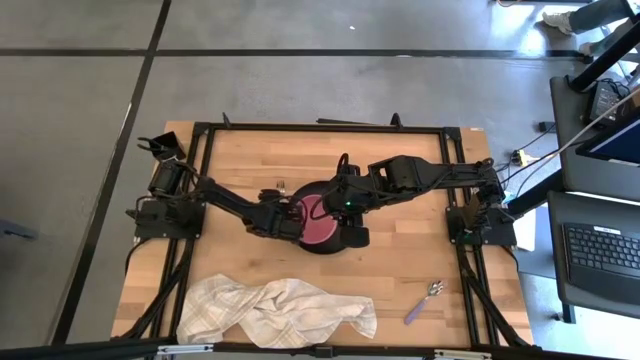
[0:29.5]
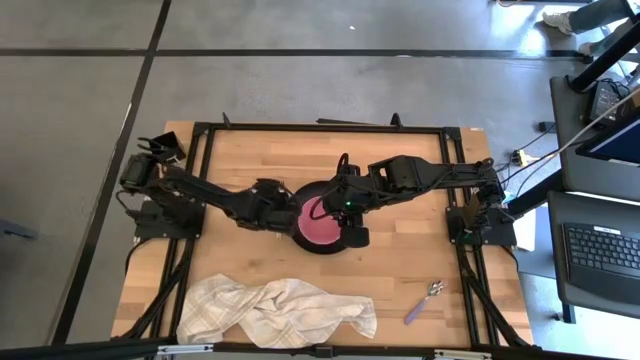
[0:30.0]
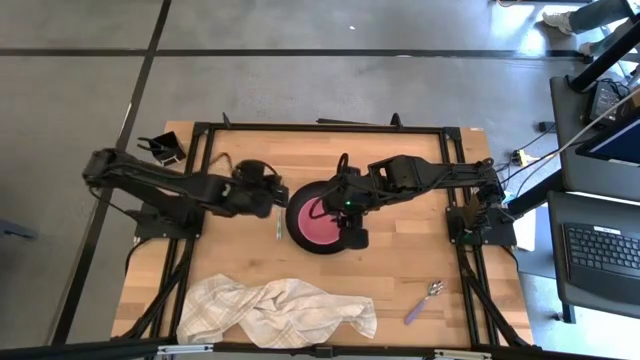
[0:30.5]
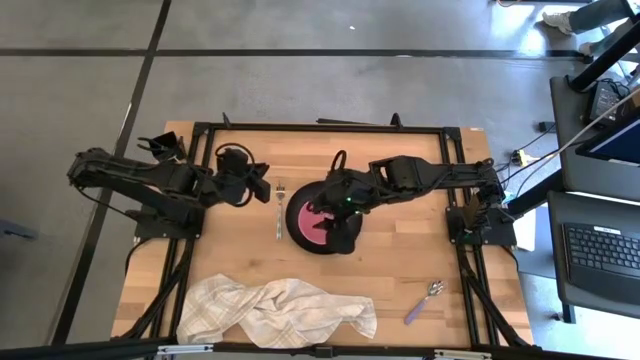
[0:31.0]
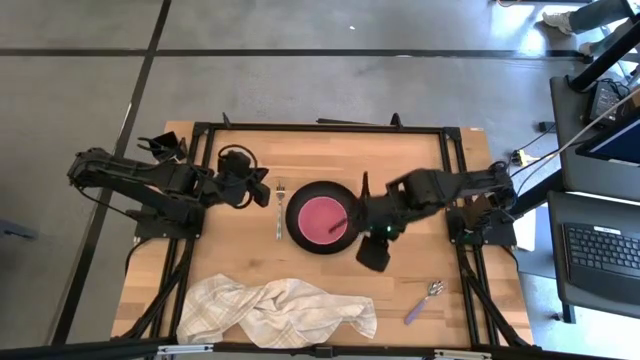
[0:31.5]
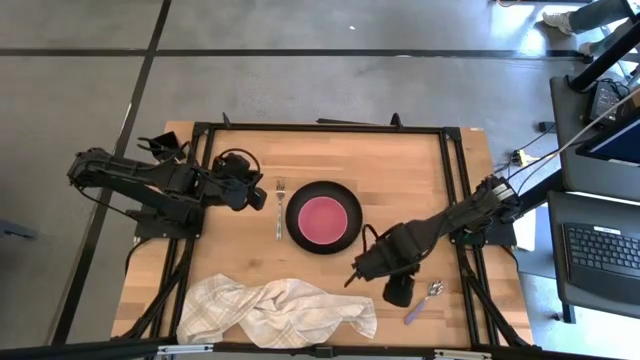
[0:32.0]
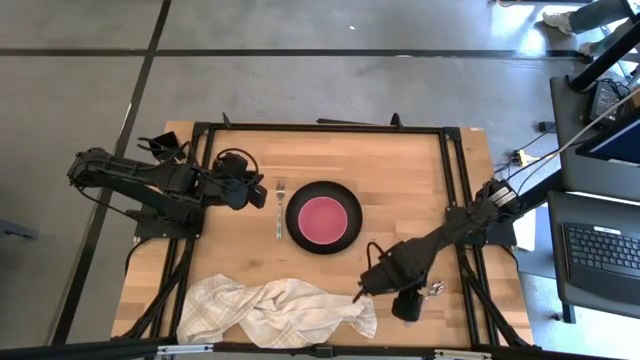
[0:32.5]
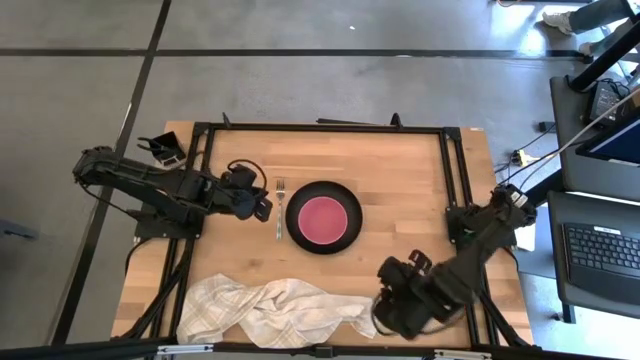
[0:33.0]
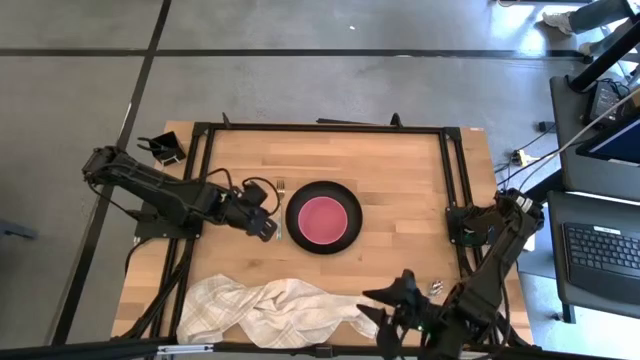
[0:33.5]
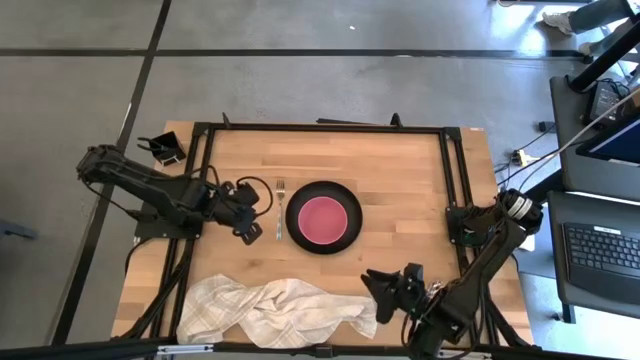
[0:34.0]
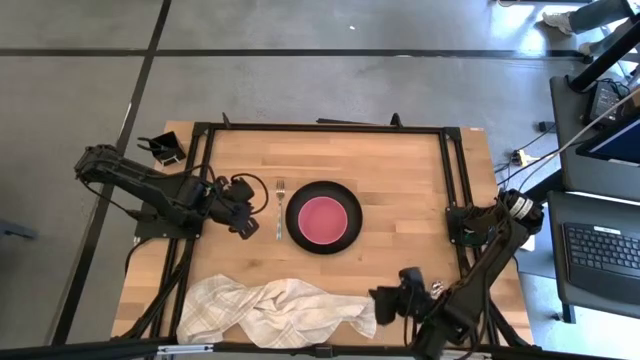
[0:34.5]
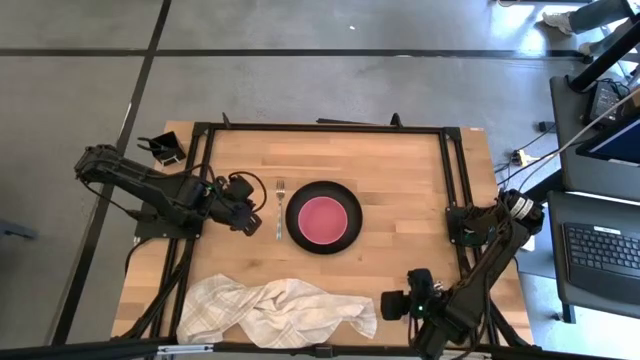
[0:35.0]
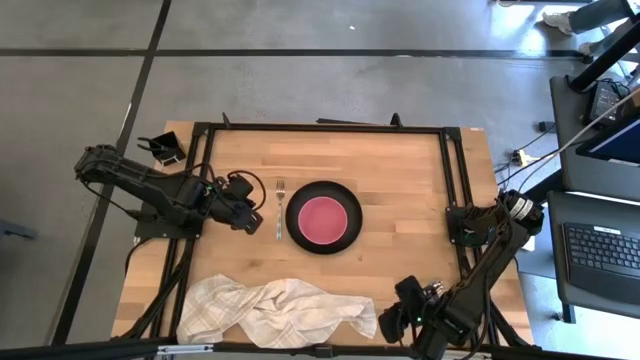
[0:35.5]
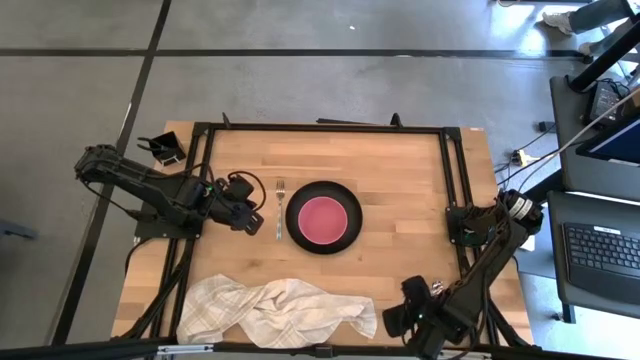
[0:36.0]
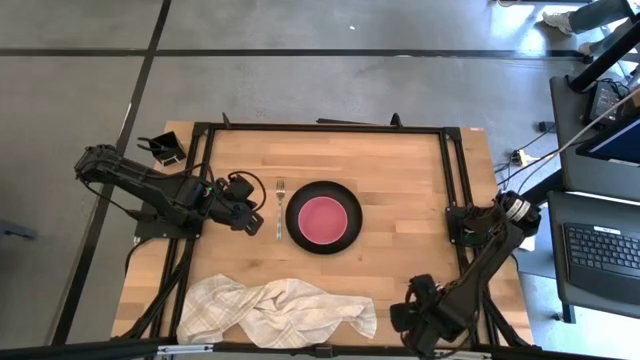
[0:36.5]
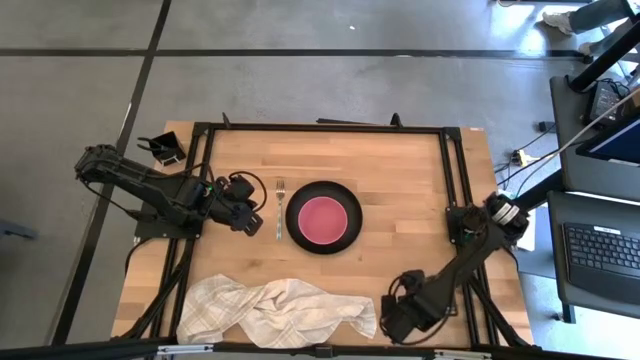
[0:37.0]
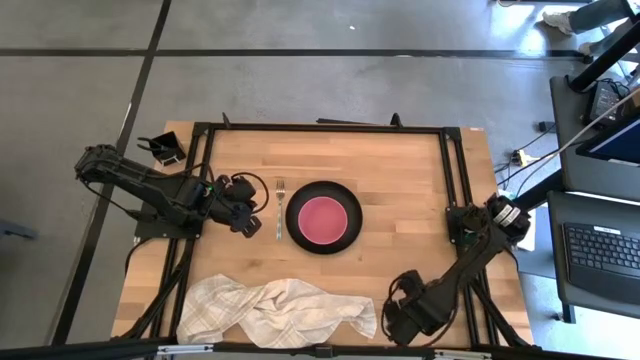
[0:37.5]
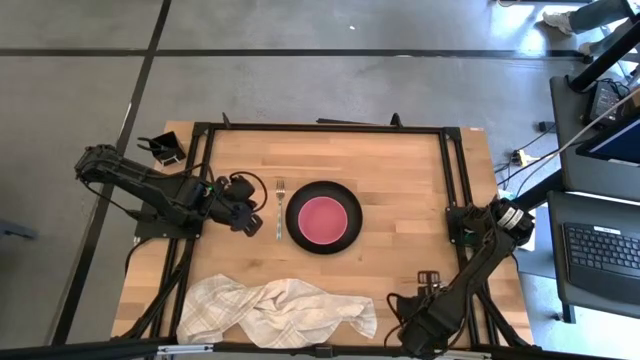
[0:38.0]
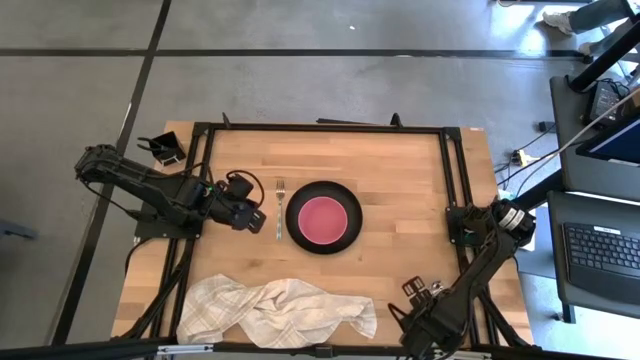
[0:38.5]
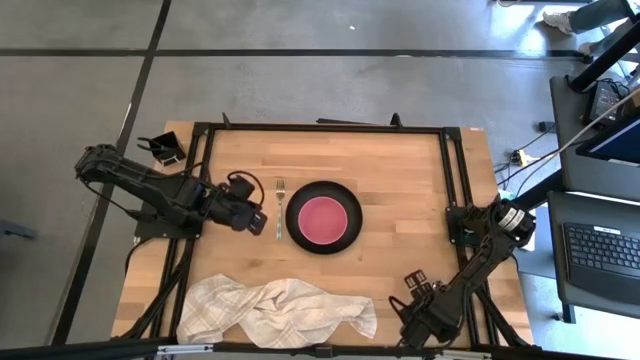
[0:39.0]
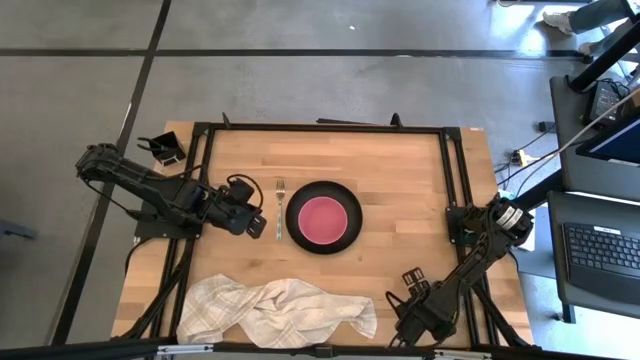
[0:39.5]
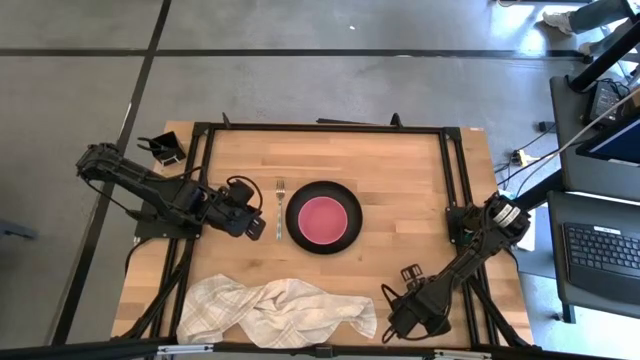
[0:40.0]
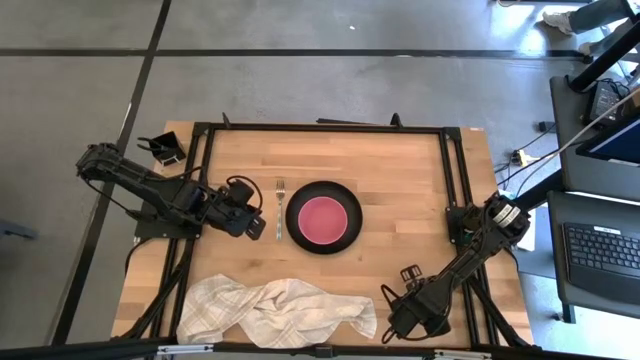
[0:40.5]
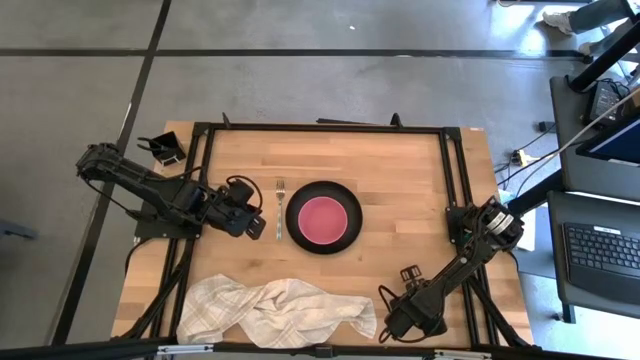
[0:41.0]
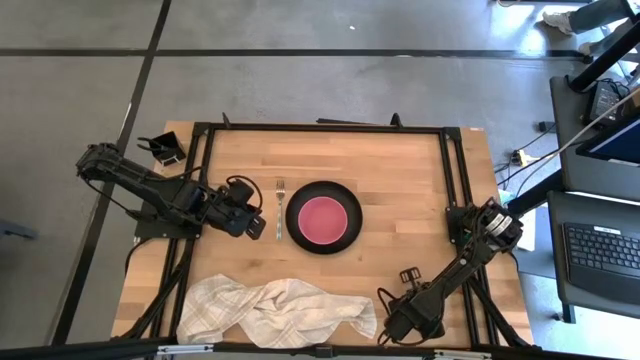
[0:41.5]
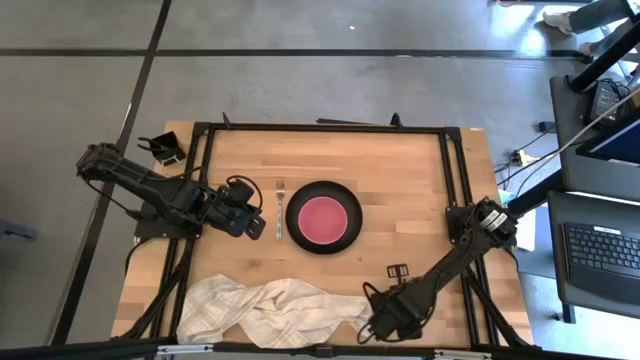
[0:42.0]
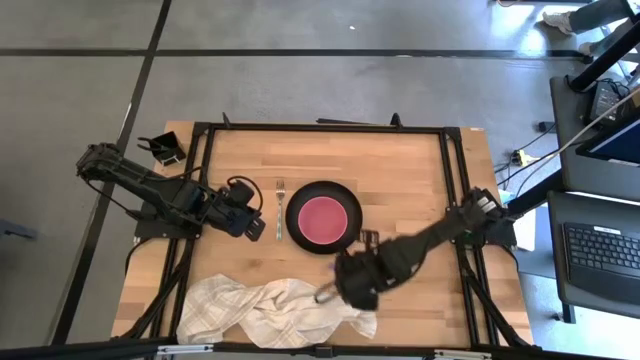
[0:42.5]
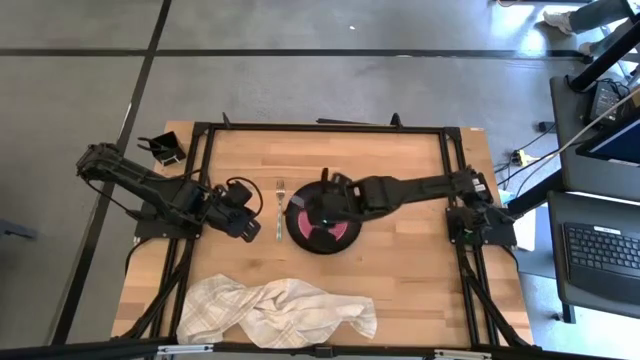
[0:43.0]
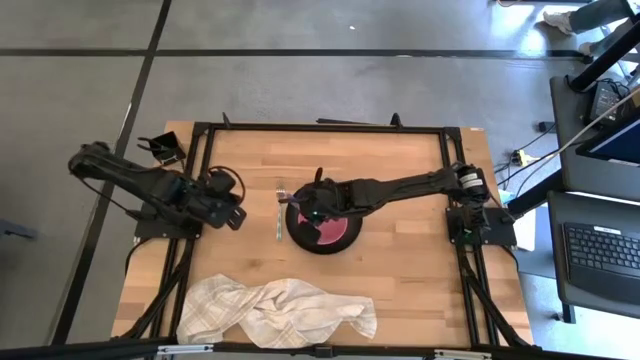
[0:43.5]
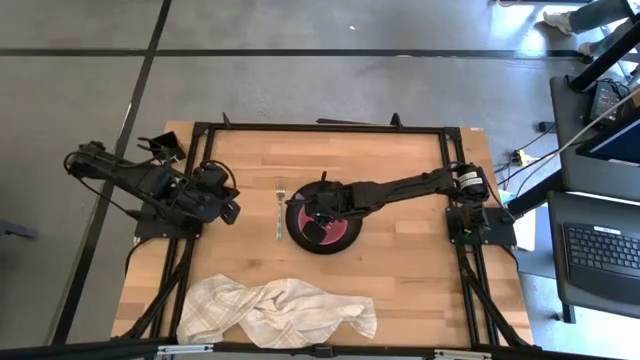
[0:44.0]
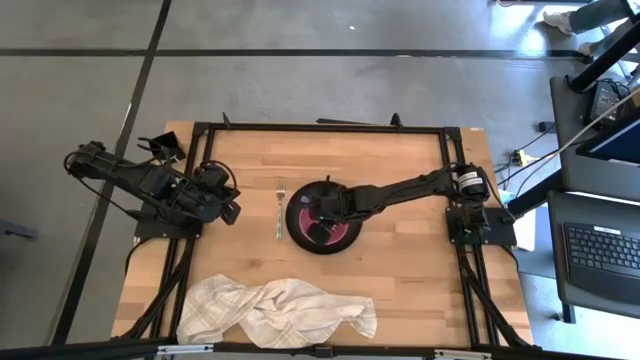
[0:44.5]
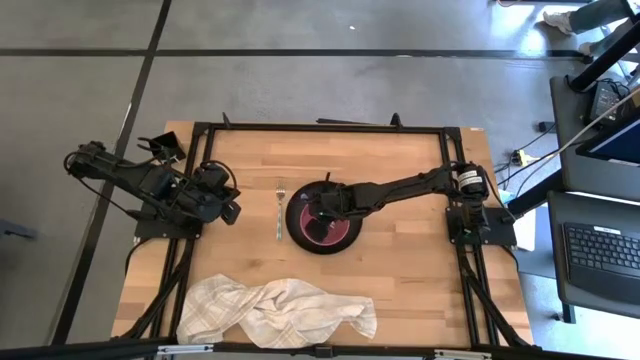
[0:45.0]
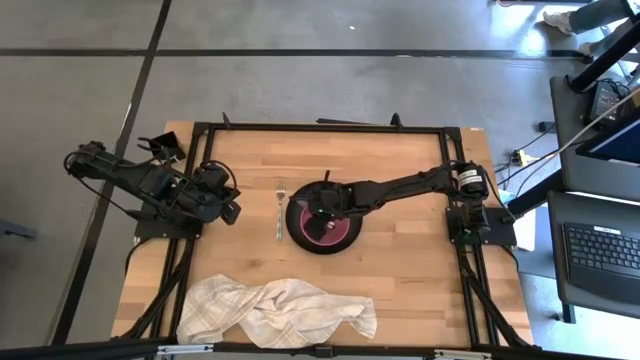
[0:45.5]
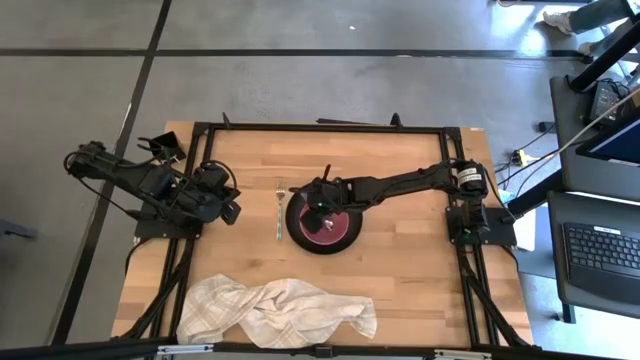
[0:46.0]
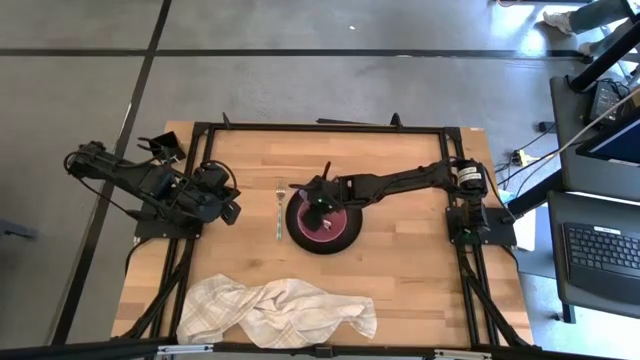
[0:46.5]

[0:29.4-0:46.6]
Task: Set table place
Put the purple spoon into the pink bowl

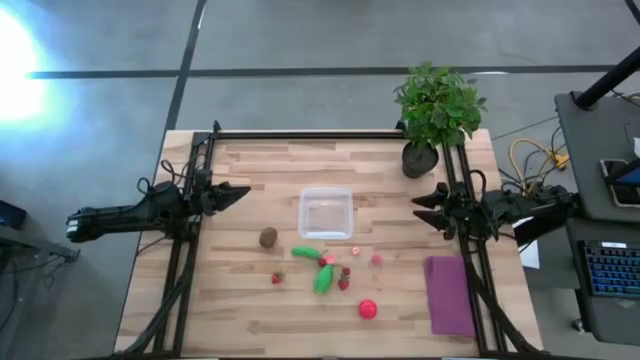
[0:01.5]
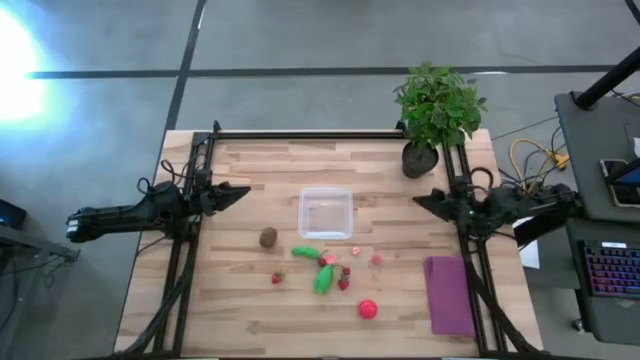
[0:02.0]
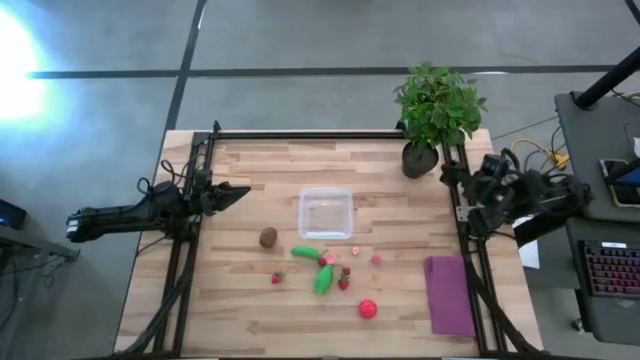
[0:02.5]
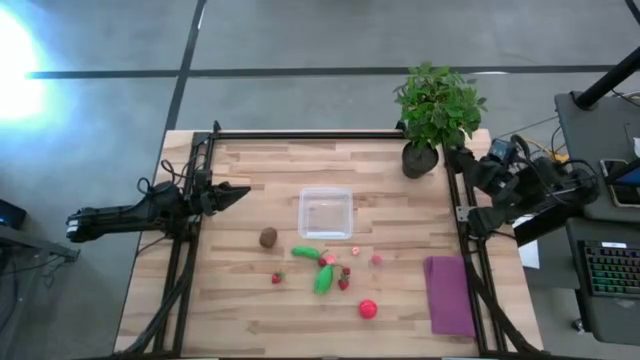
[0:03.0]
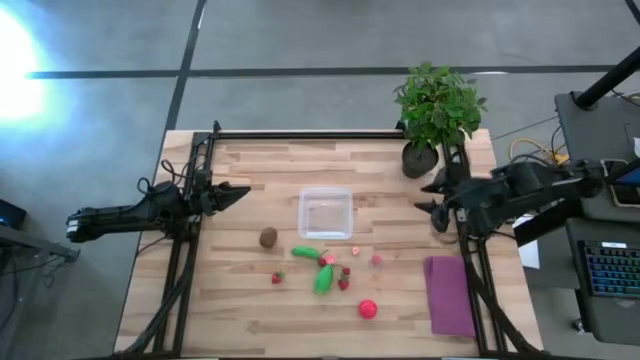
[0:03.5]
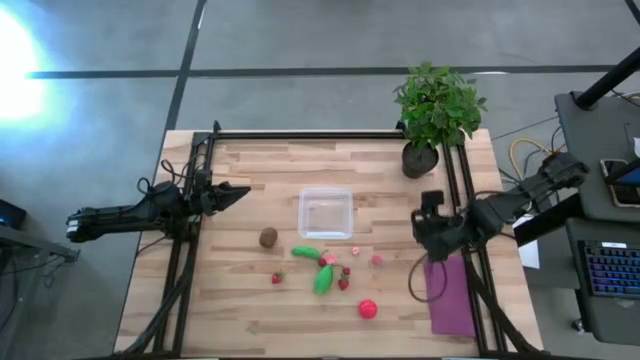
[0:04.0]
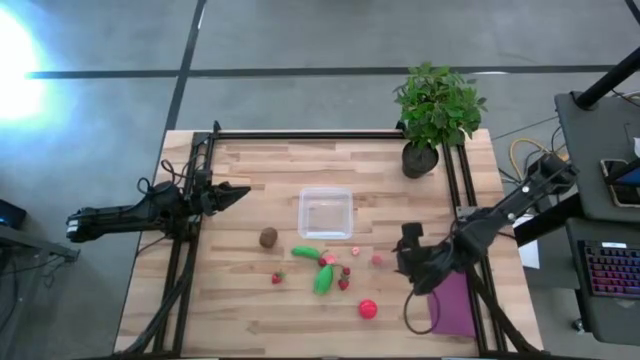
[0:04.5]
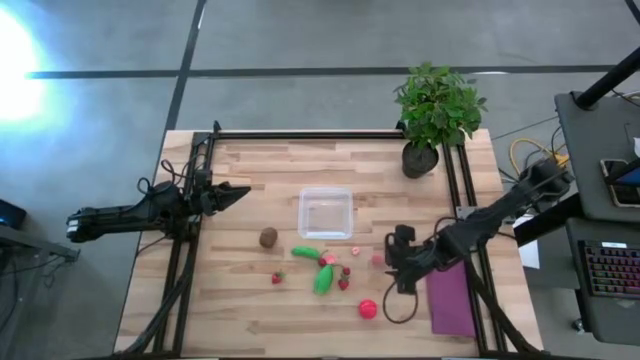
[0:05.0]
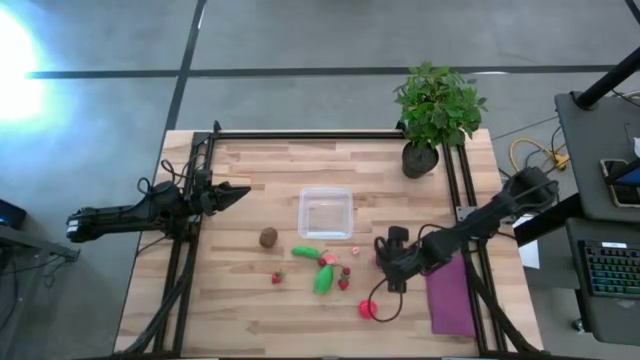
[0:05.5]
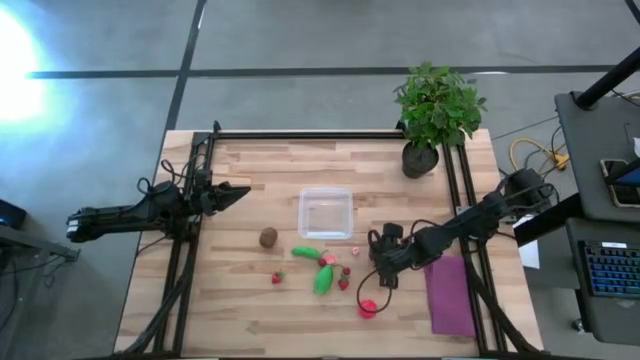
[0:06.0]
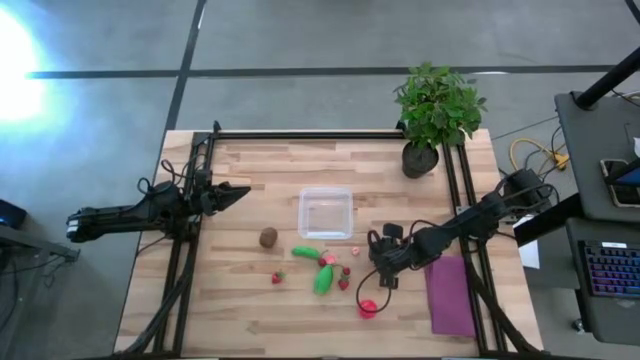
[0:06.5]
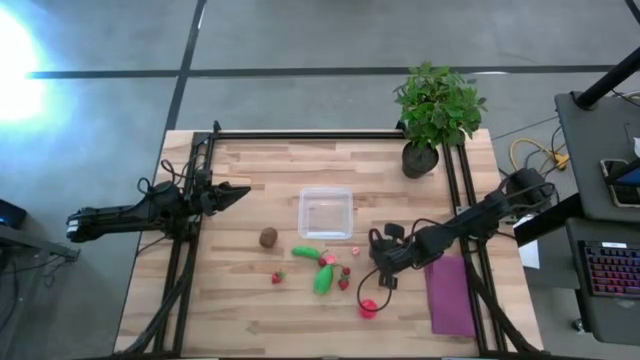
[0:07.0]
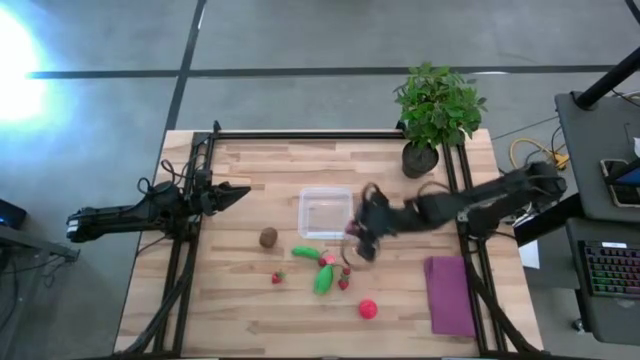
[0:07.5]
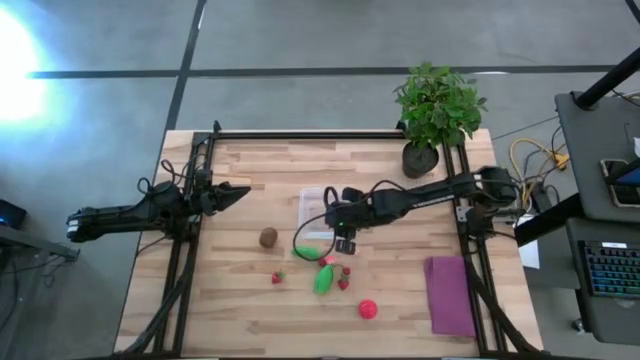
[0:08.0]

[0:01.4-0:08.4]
Task: Pick and placing Produce into tupperware
Put the right pink peach into the transparent bin
